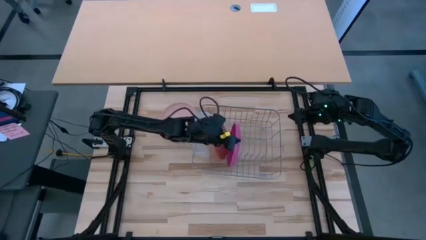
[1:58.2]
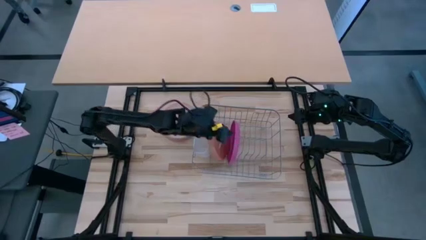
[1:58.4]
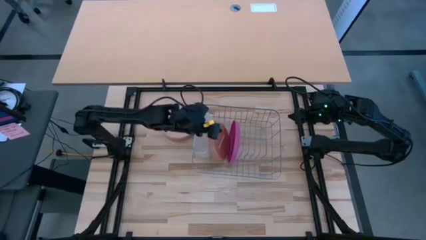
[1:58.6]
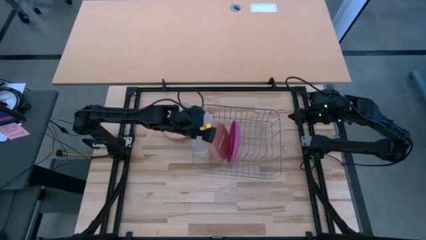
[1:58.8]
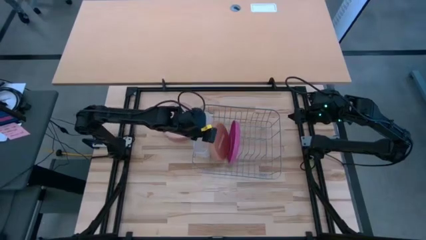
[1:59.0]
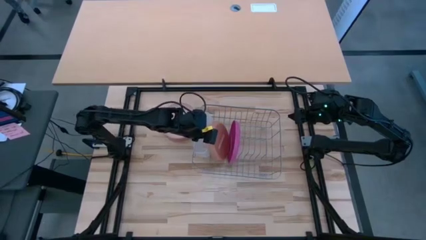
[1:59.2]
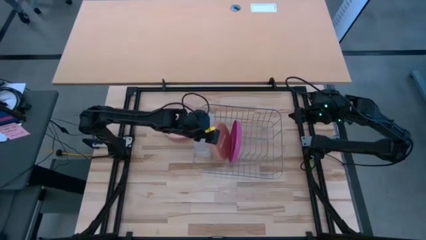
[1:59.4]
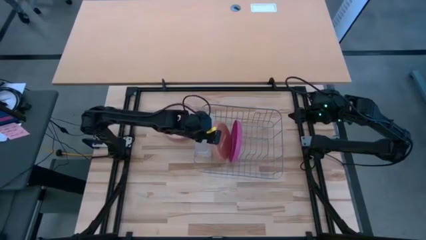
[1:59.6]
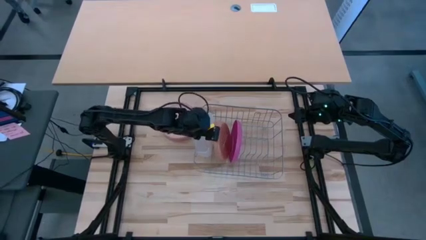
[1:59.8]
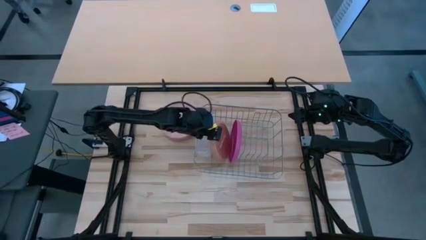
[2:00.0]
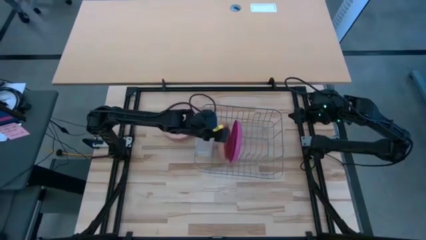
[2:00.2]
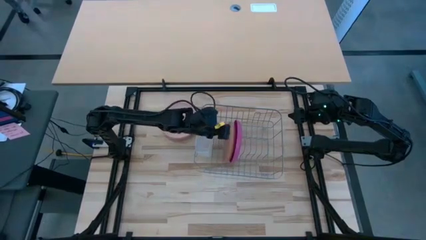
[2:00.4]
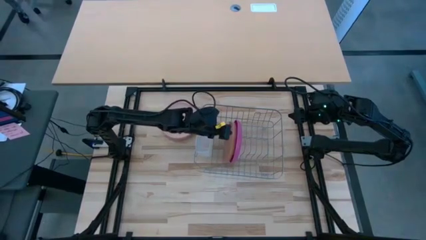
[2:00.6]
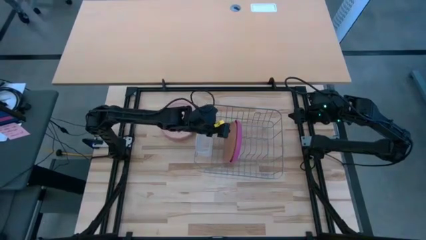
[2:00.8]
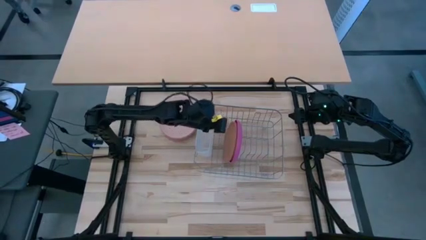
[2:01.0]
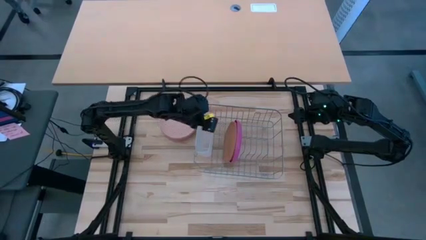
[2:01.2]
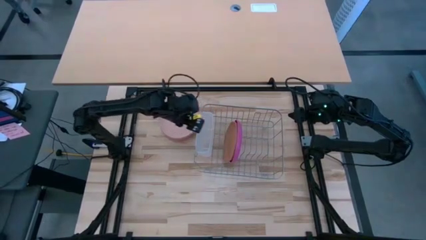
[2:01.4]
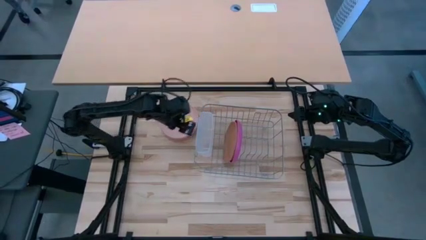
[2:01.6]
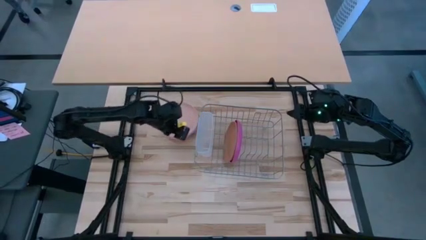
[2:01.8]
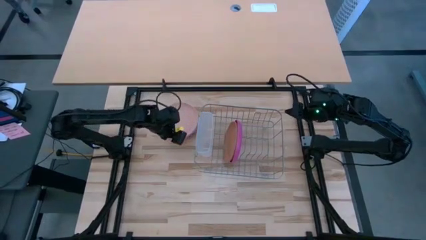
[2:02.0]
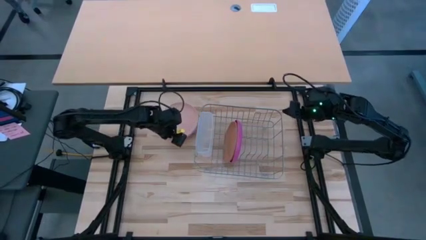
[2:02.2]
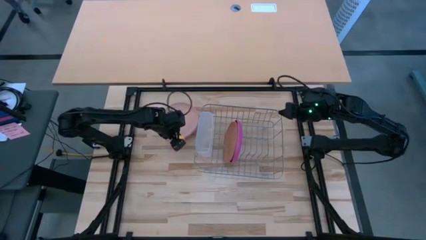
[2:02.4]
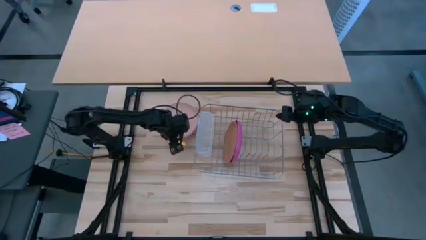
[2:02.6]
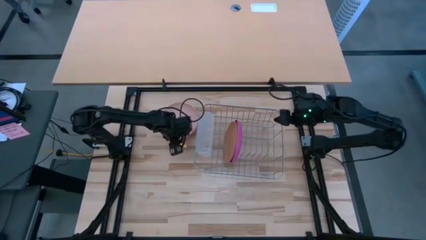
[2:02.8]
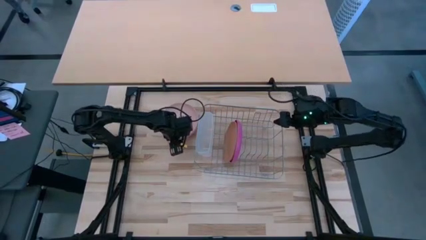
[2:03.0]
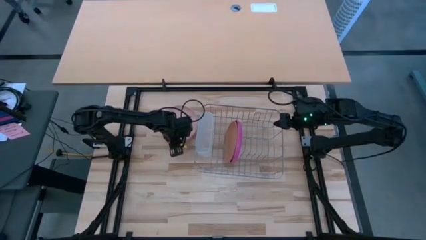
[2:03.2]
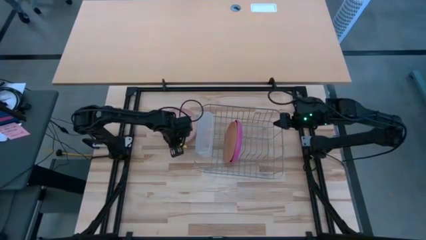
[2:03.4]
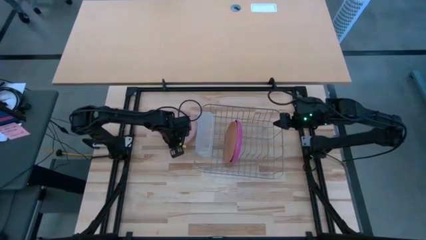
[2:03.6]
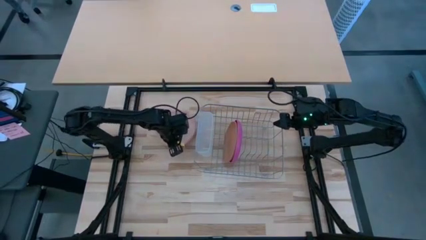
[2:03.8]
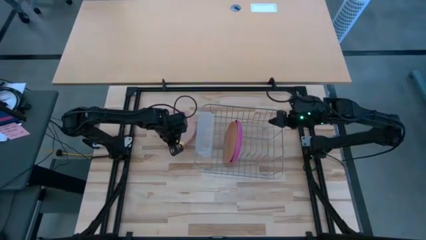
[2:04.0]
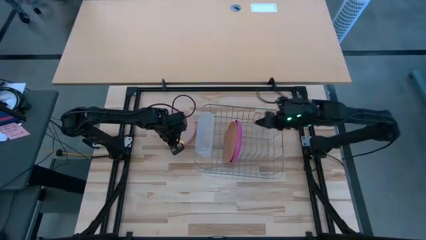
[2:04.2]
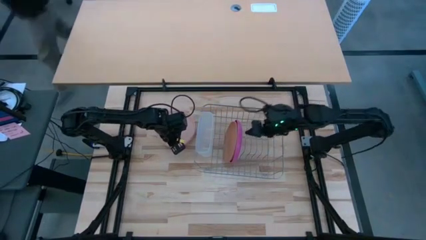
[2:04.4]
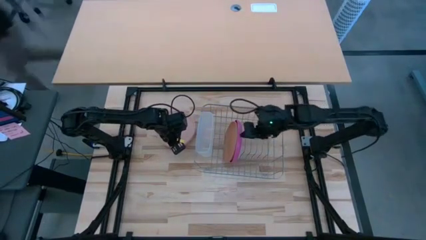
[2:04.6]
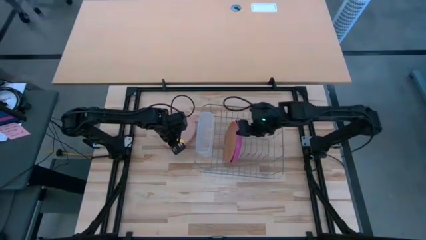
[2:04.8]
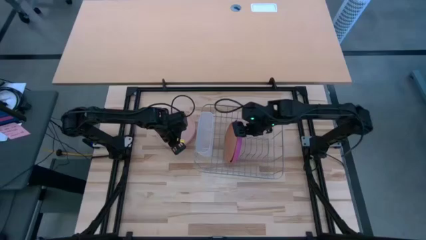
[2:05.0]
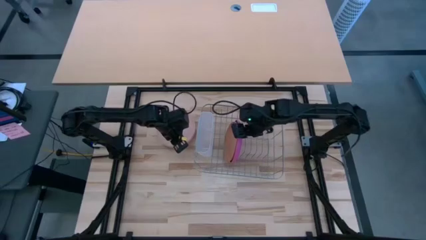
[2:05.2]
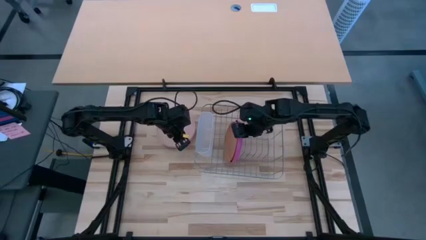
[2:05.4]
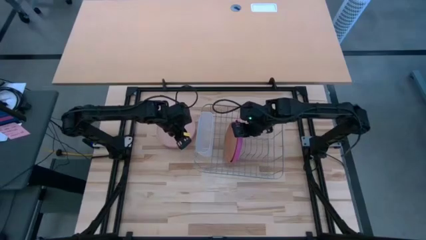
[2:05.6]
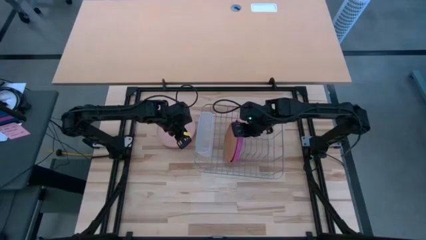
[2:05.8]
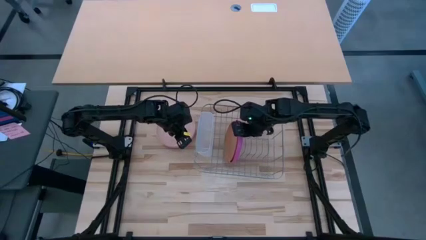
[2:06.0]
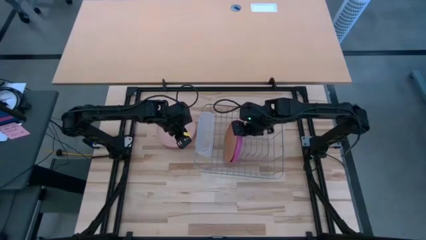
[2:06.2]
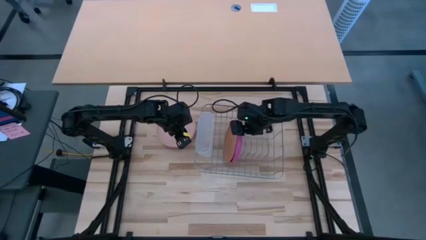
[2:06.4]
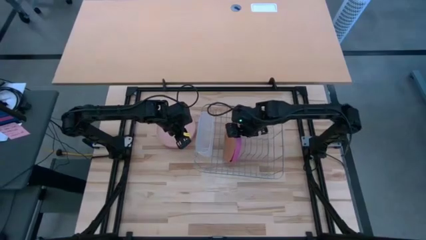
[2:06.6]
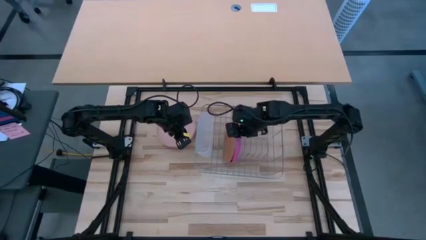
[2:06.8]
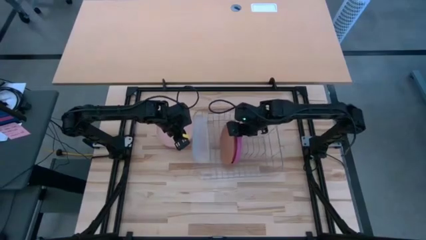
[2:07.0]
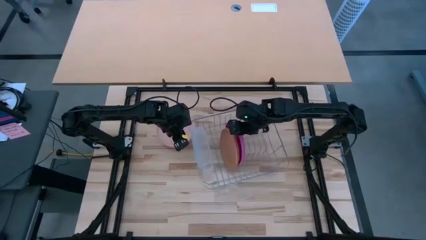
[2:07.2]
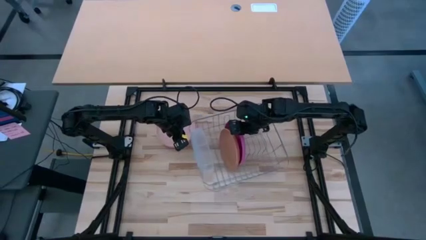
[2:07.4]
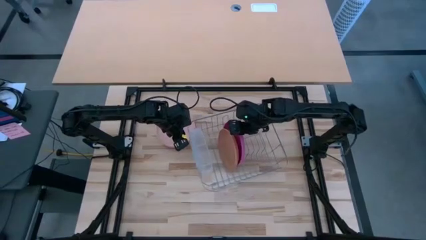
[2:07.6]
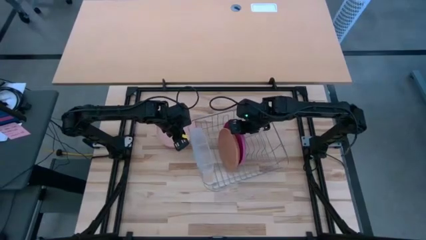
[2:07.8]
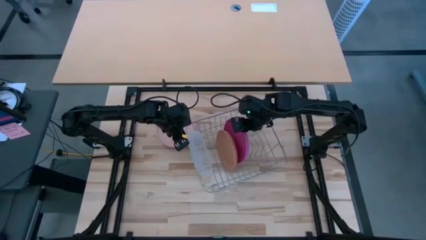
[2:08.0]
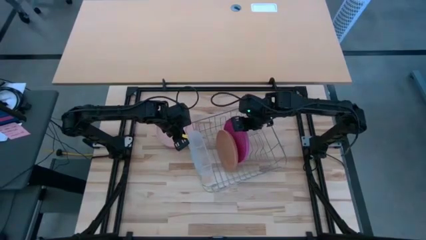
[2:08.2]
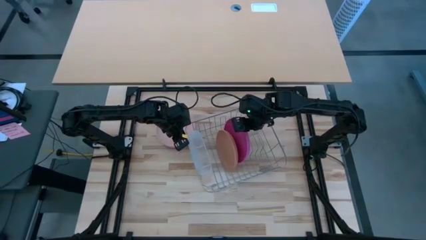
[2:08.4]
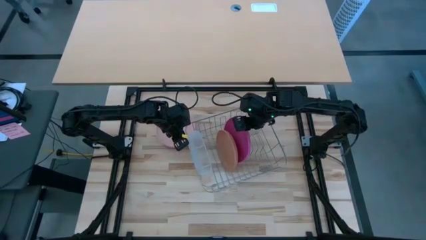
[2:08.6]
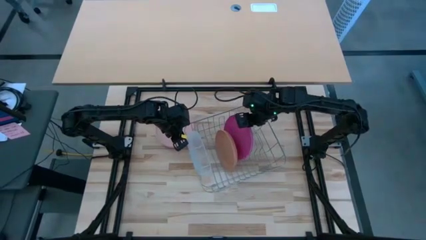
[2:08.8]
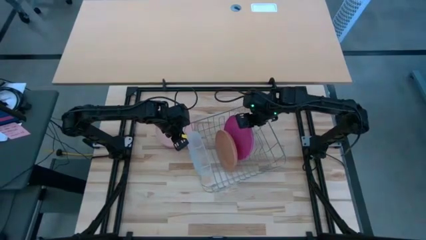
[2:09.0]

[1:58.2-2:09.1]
Task: Sort dishes
Adjust the plates in the dish rack

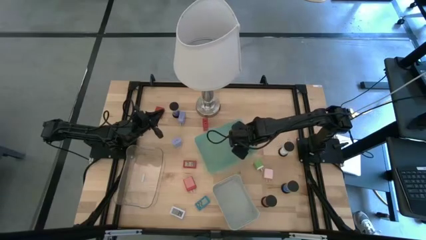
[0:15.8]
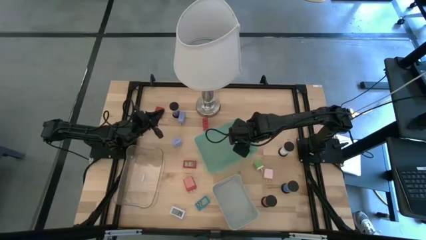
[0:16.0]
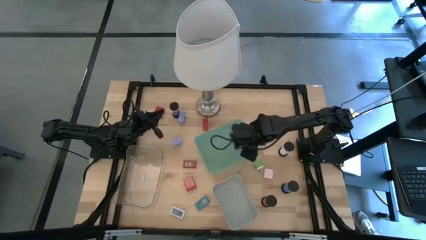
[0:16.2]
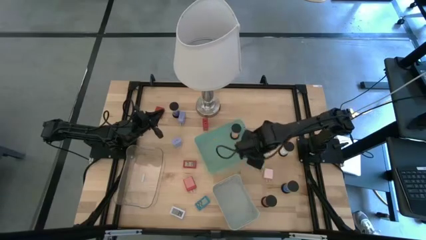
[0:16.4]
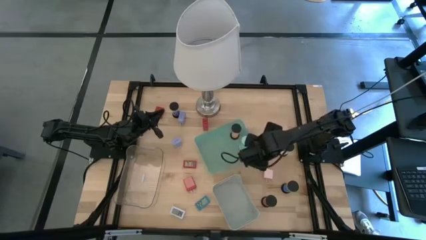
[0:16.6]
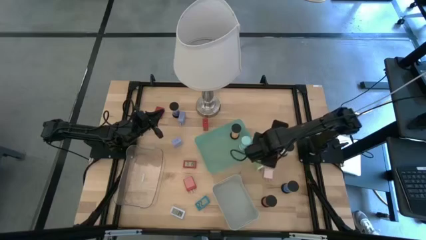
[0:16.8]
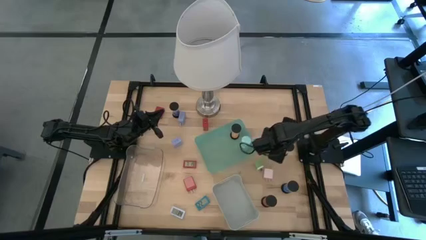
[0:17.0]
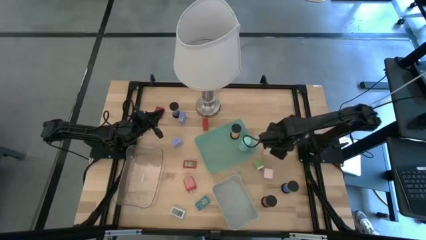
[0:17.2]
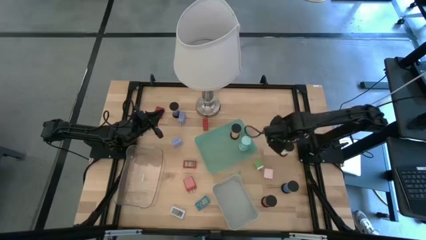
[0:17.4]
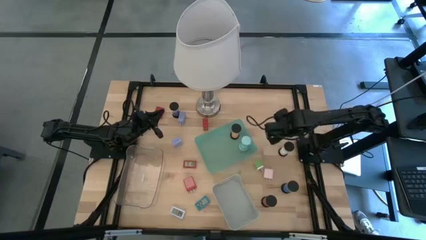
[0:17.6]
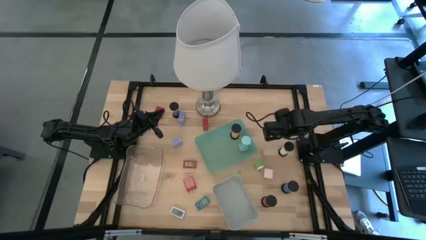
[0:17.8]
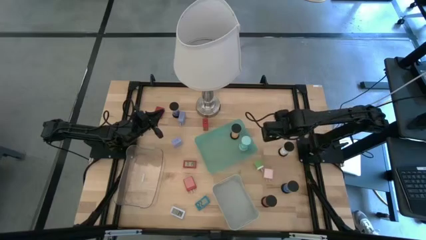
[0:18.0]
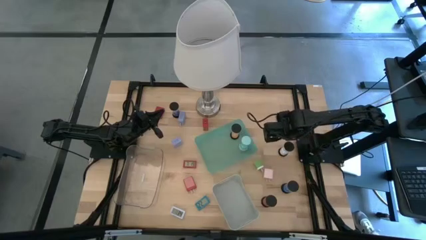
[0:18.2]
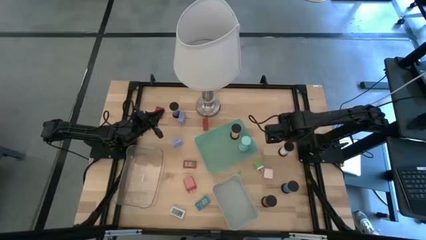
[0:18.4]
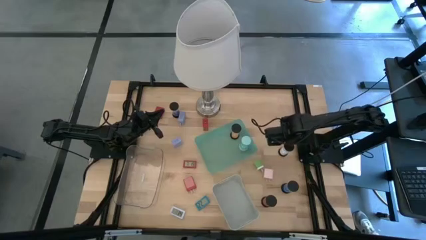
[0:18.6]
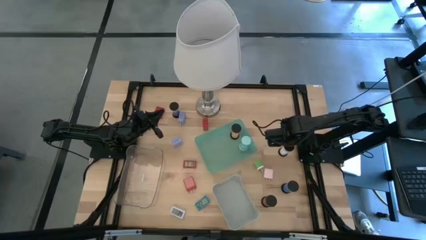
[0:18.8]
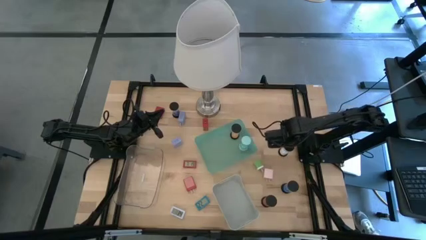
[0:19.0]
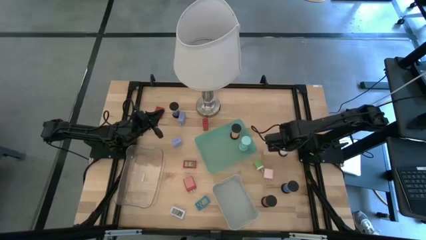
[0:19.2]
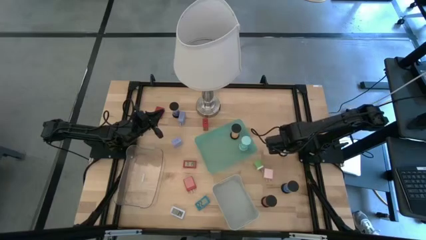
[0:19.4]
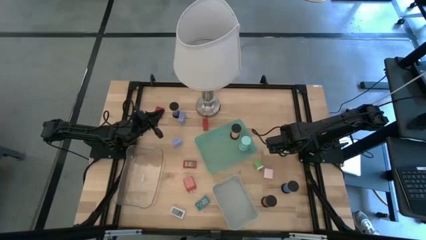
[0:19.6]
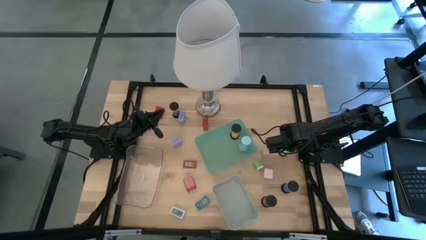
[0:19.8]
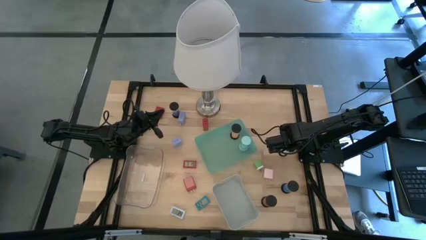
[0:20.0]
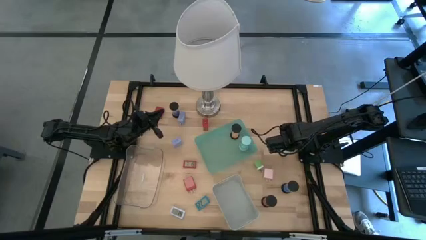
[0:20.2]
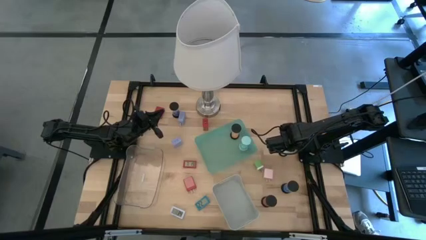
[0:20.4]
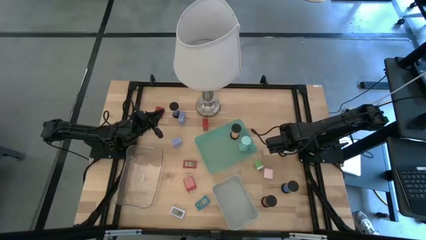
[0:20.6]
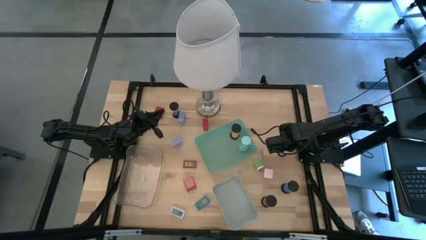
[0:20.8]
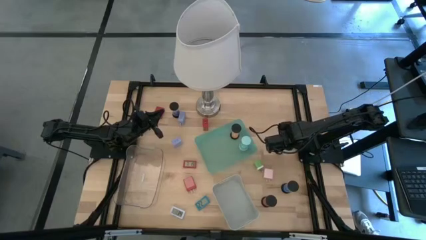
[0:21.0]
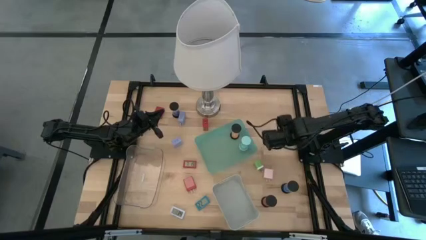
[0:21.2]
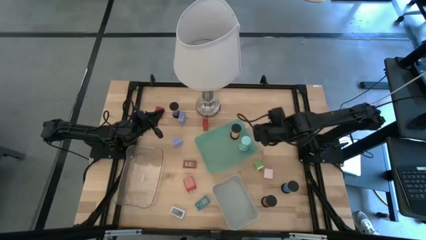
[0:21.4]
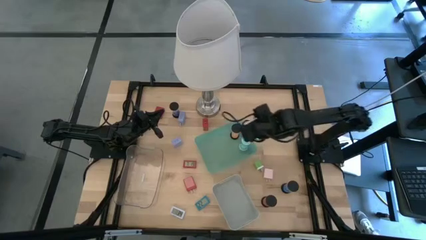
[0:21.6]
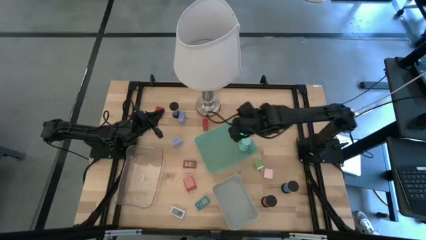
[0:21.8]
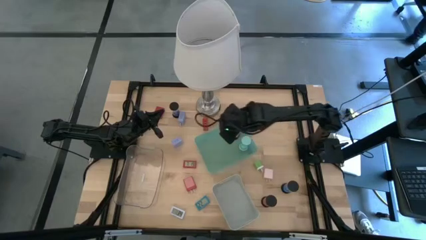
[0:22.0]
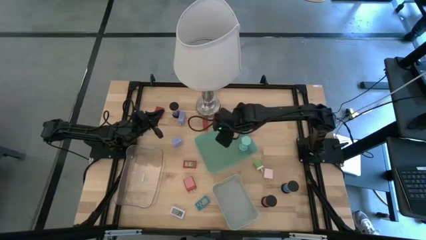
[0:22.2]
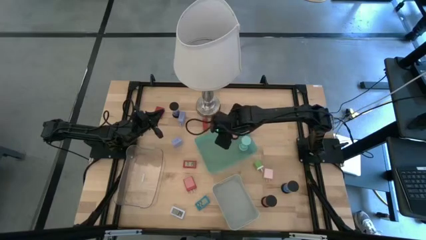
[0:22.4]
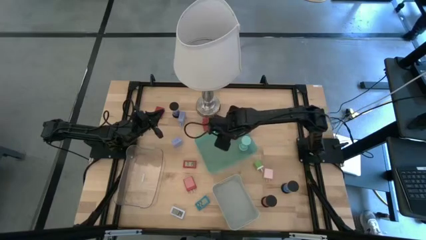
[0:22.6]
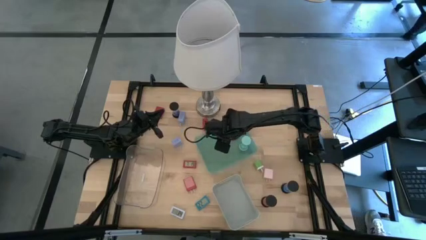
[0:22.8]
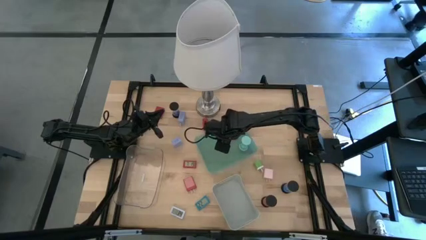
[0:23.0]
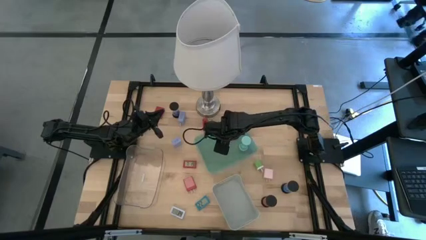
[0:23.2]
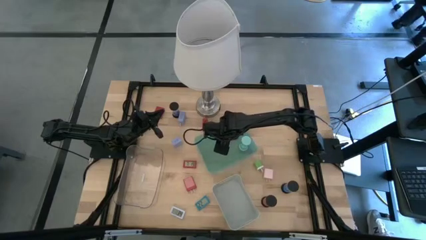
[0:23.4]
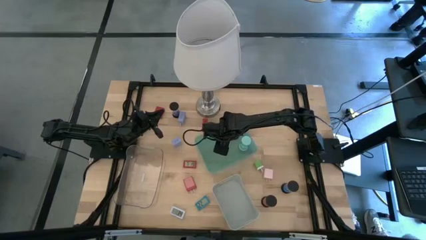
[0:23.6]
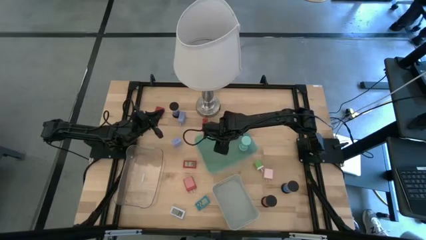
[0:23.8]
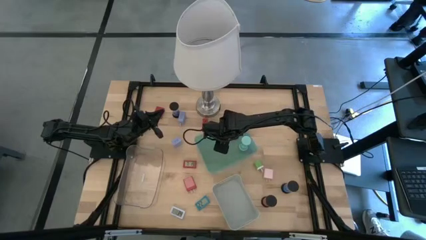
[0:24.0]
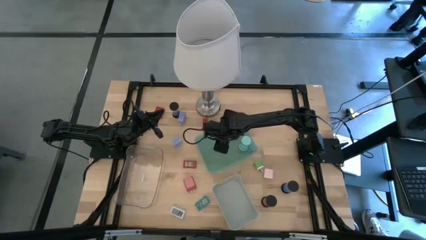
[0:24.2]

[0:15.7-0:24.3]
Task: Pick & Place Office items
Put the white hourglass into the green bin
